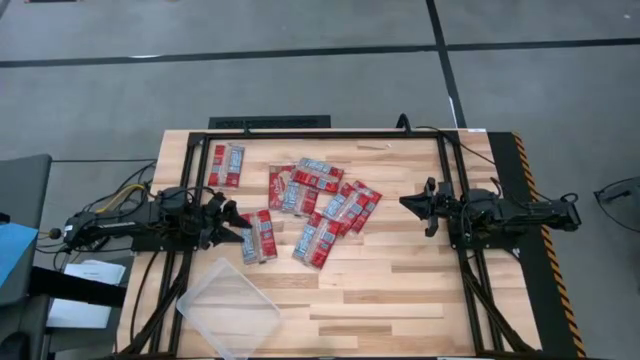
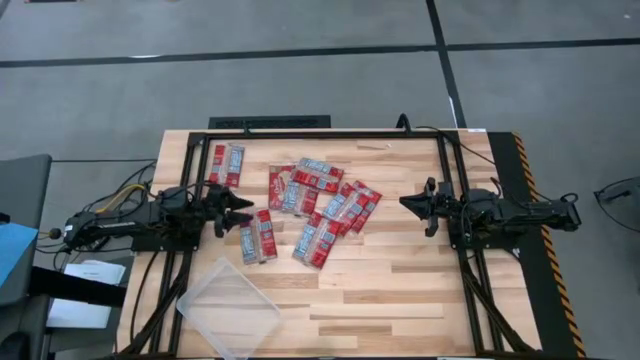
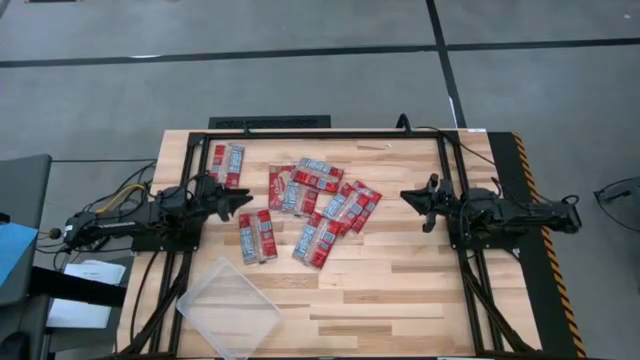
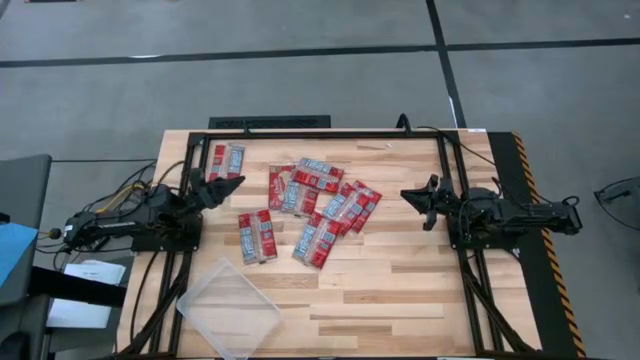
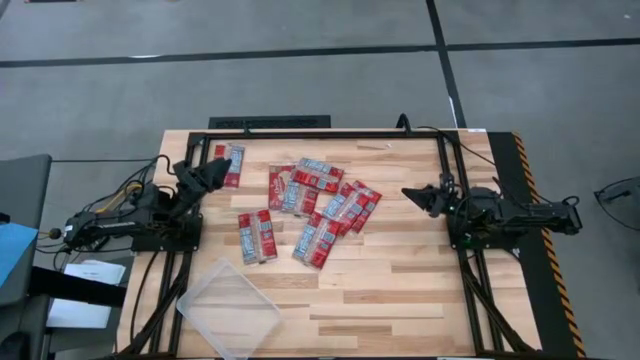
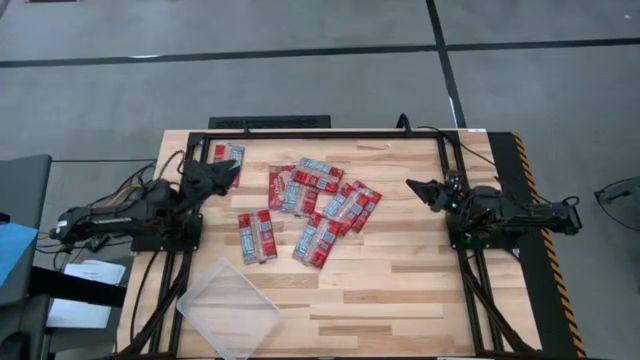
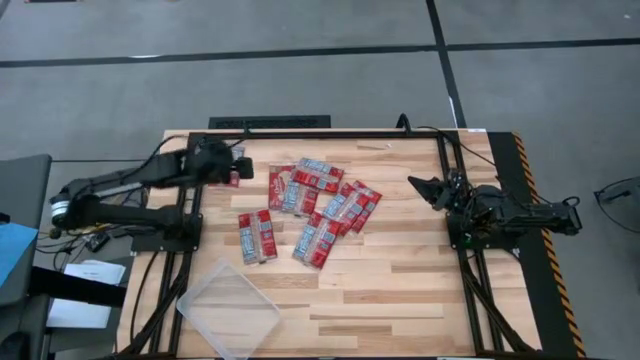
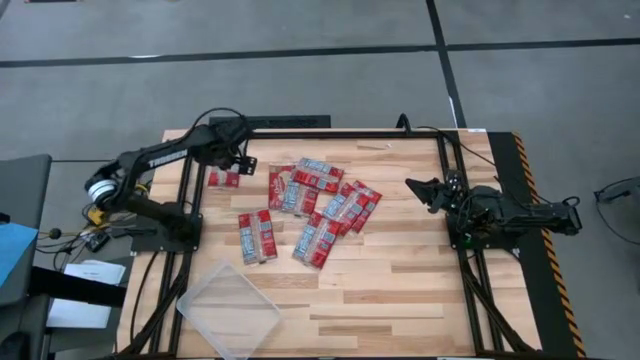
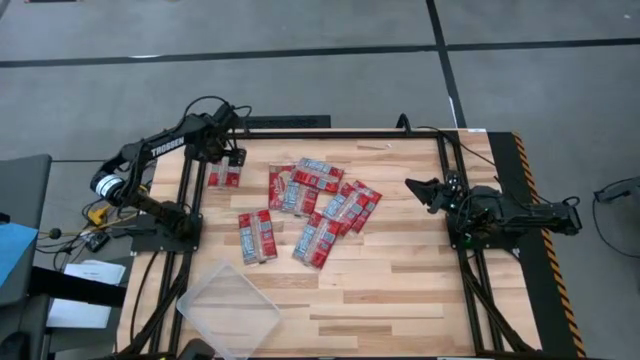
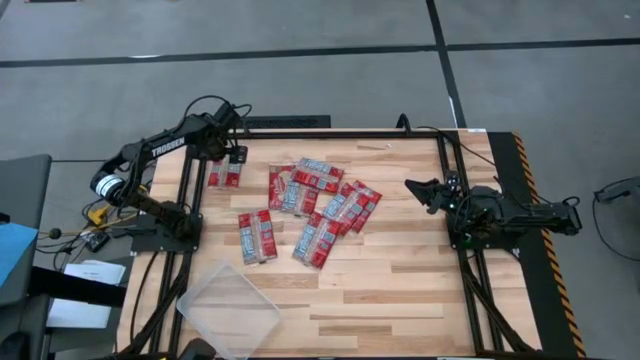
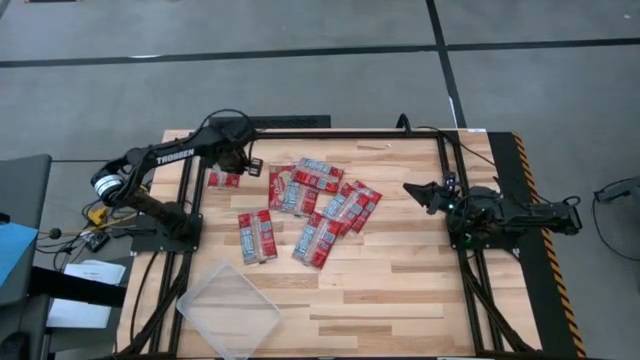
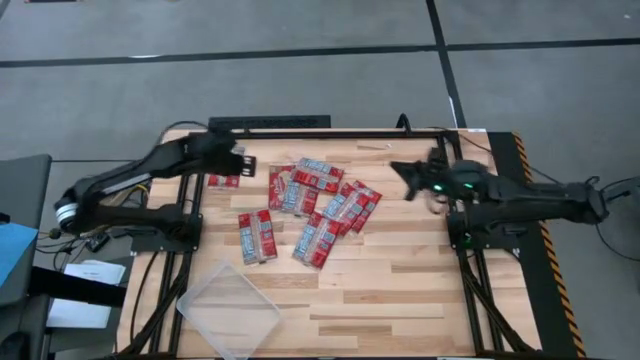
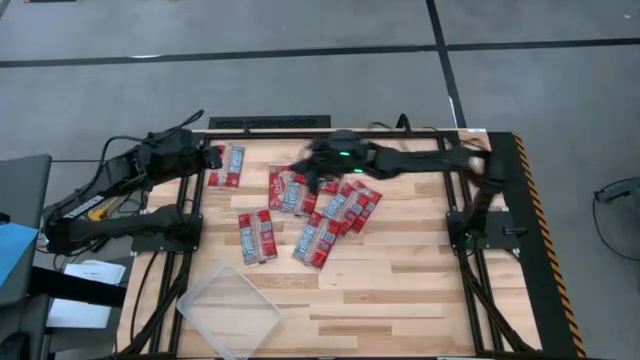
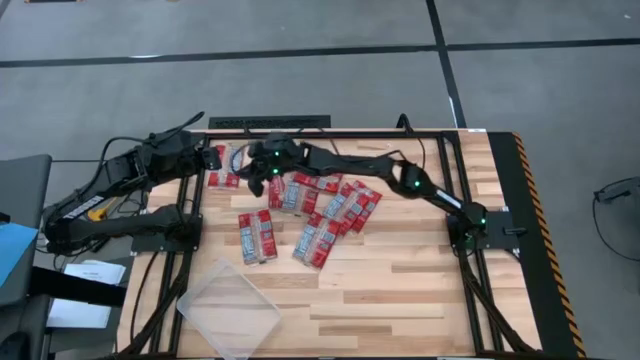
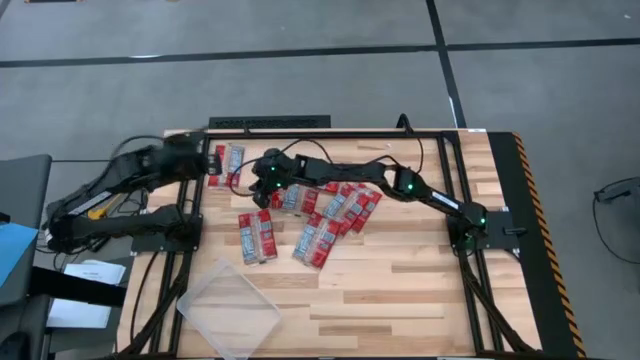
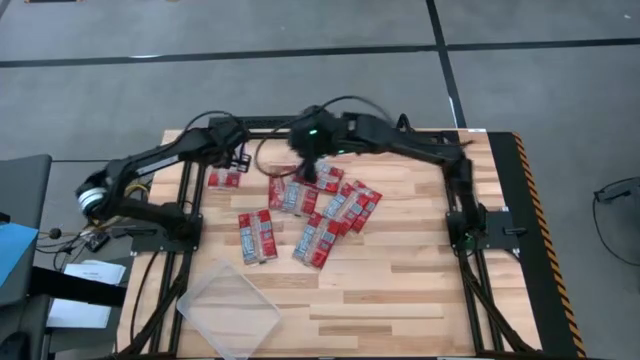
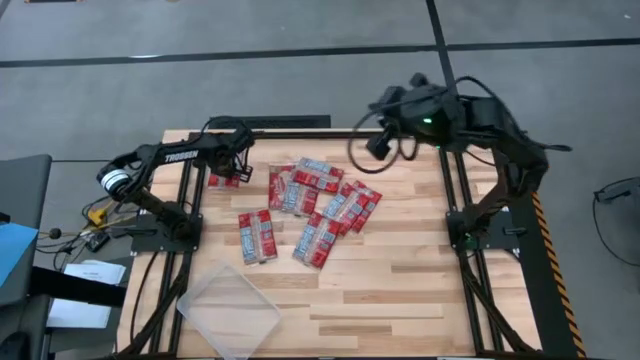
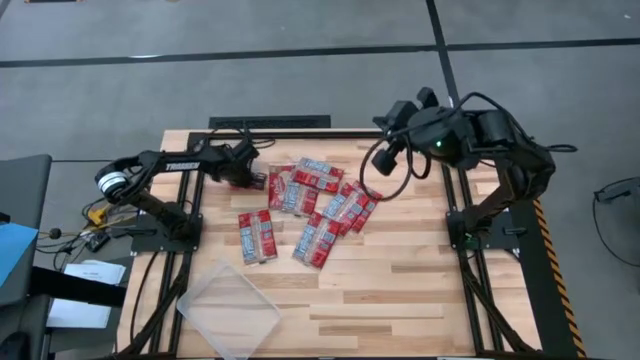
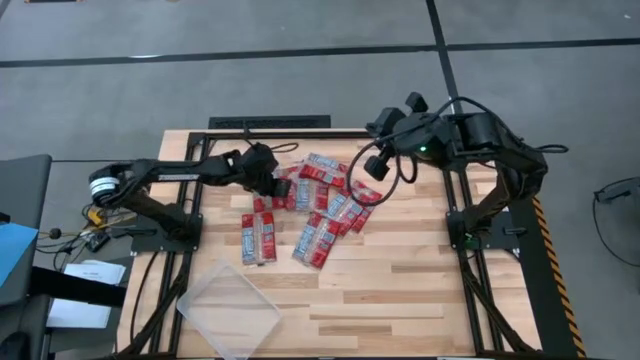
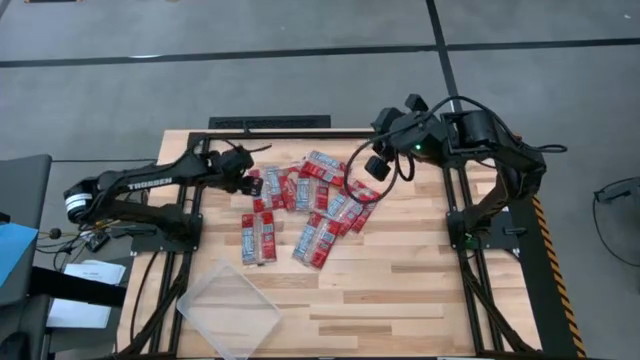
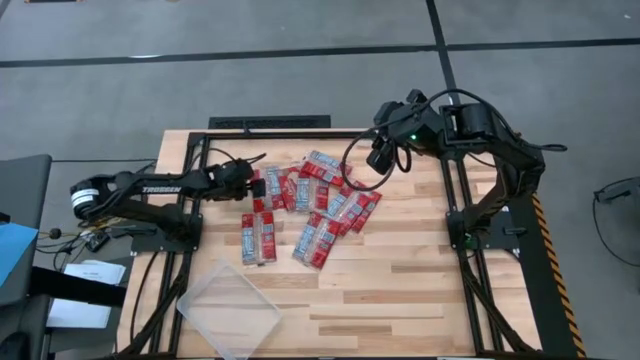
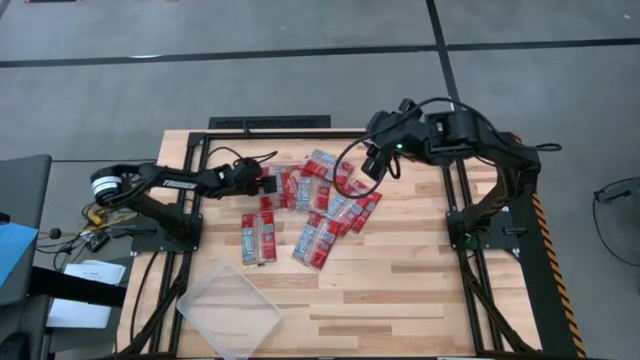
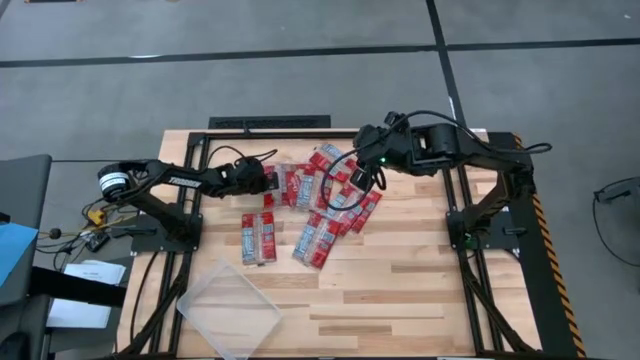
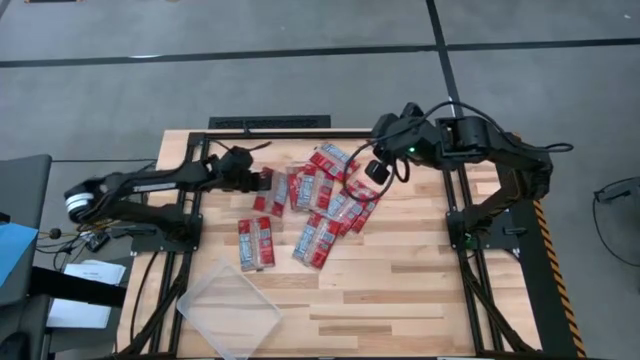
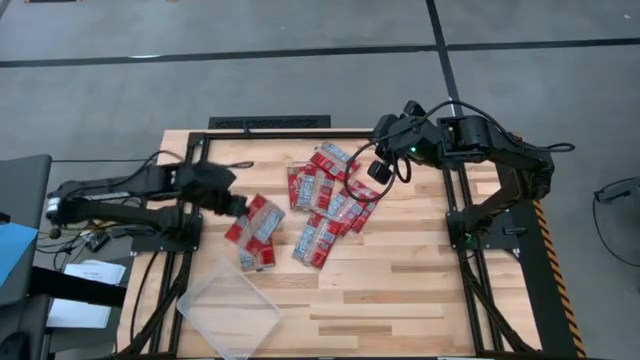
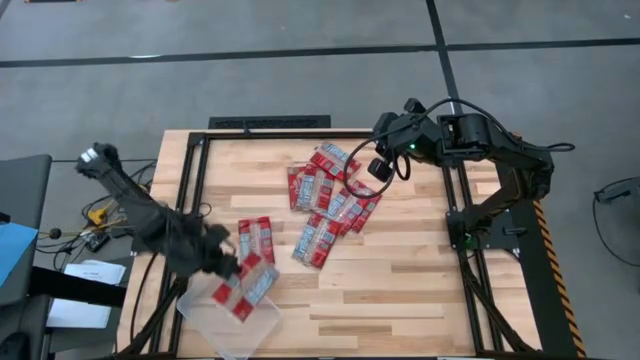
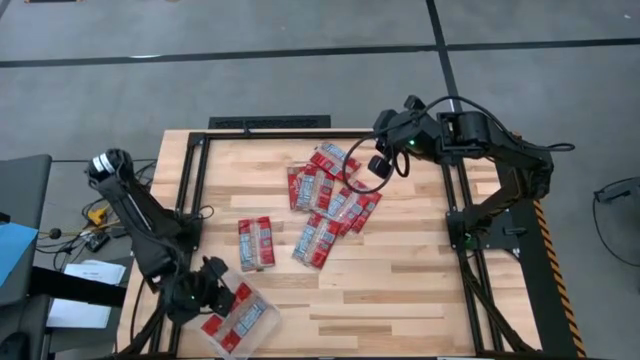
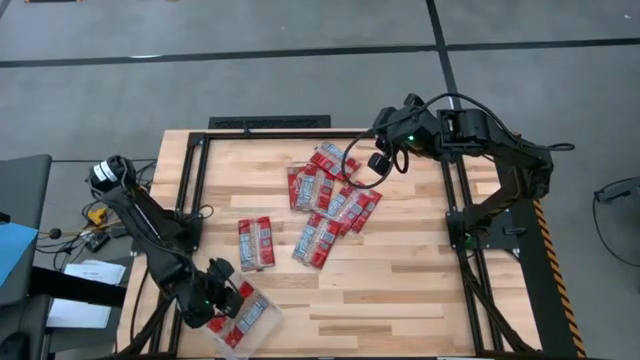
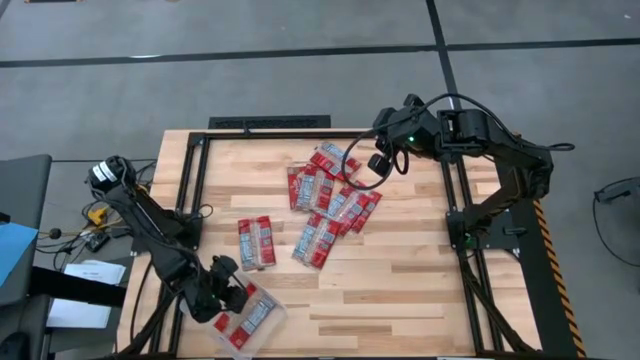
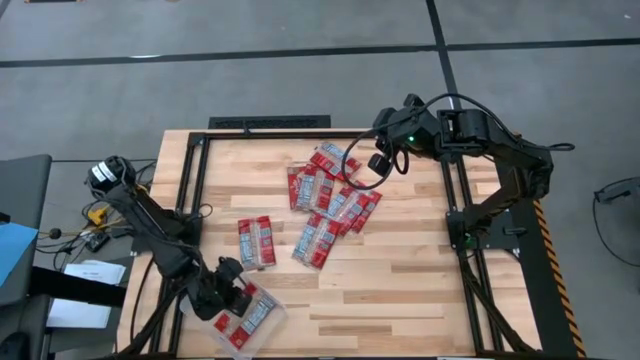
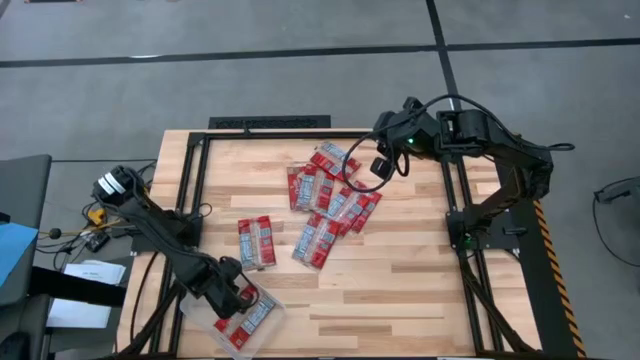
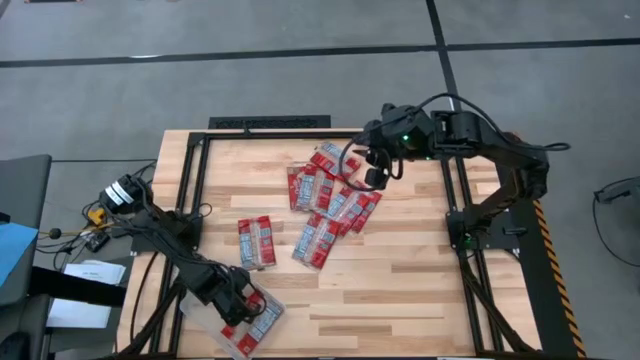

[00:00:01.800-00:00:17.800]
Task: Sort popcorn bags into baskets
Put the red popcorn bag into the transparent bin

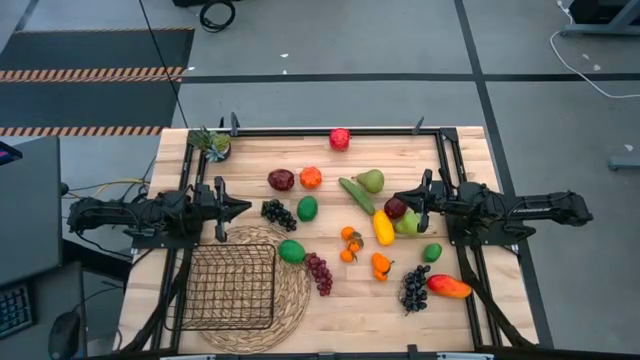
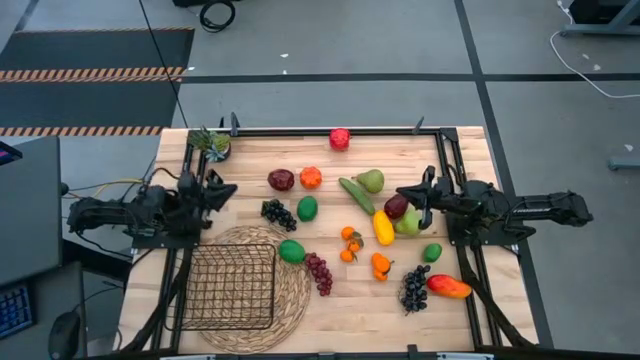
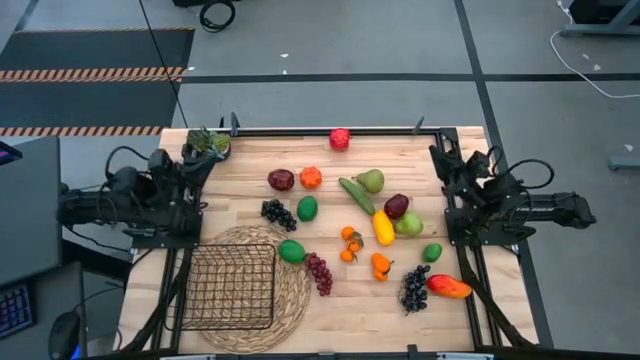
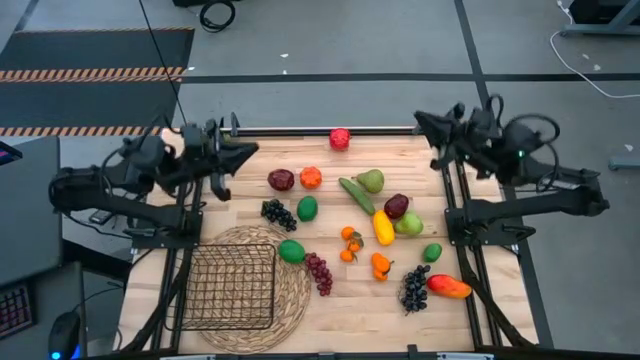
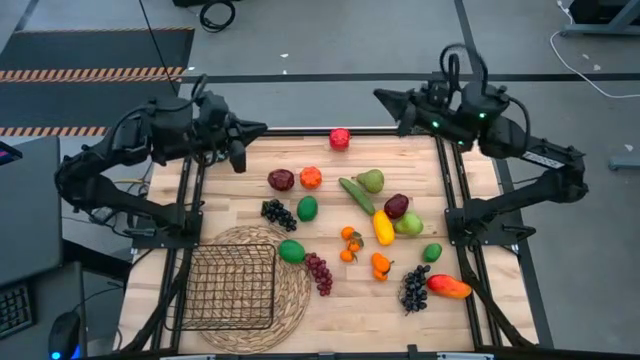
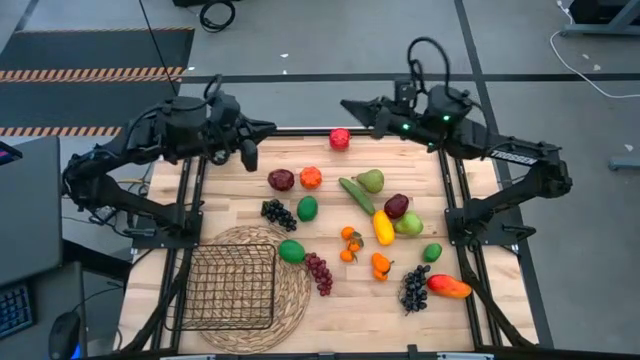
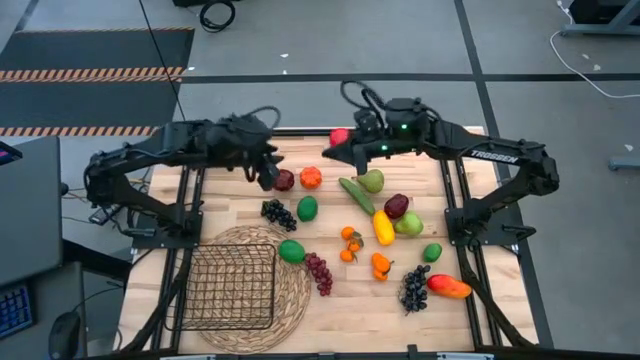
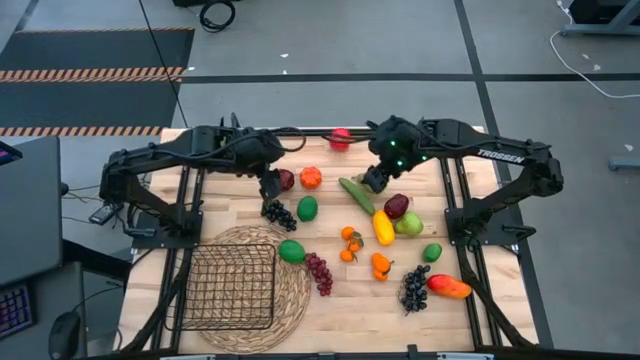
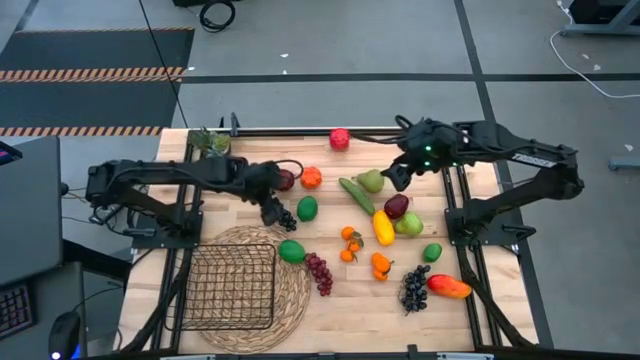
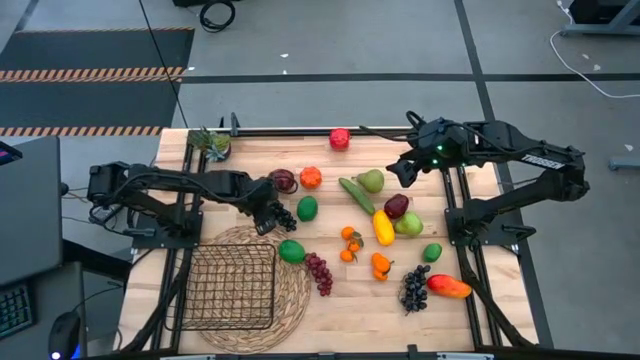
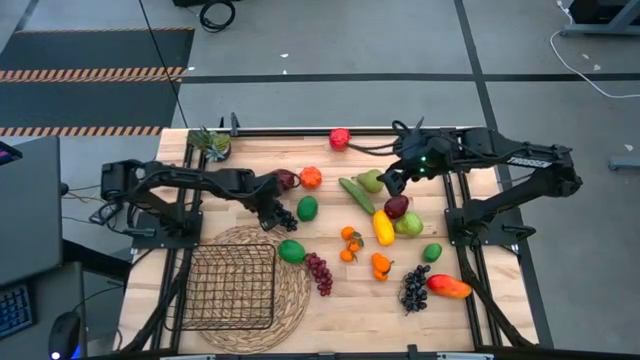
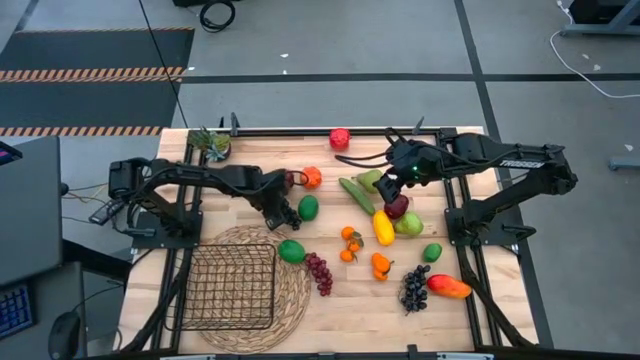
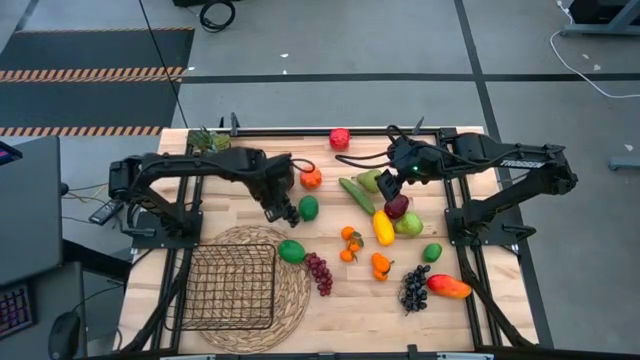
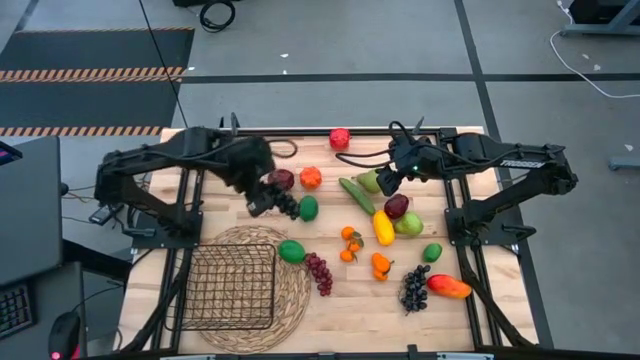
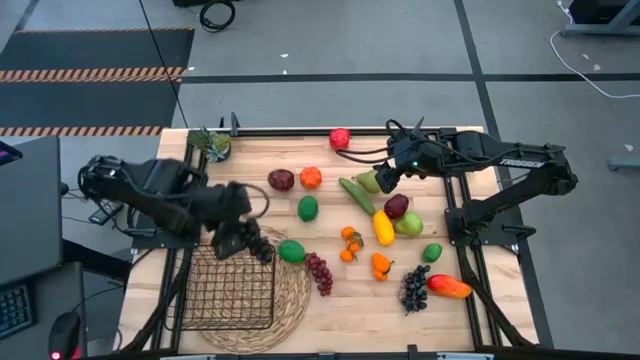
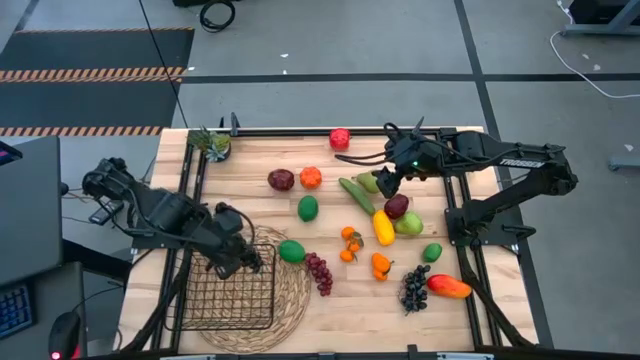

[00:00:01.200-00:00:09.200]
Task: Build produce basket
Put the top black grapes into the black wire basket
